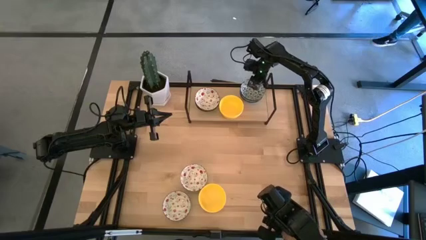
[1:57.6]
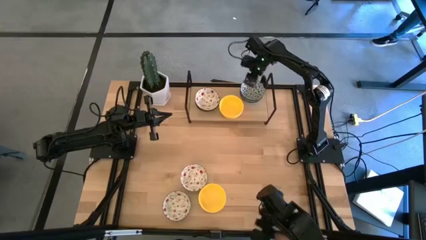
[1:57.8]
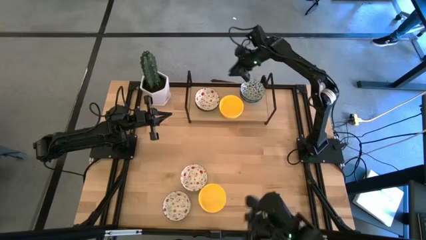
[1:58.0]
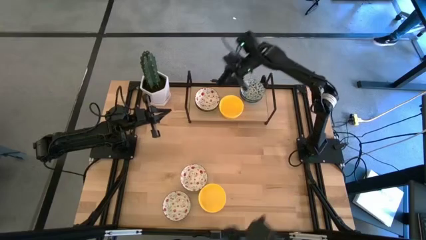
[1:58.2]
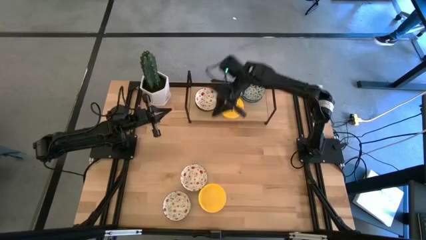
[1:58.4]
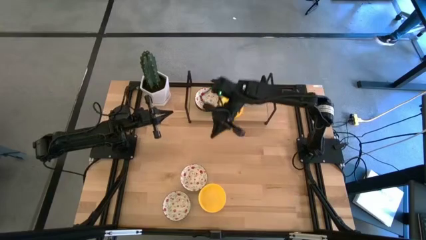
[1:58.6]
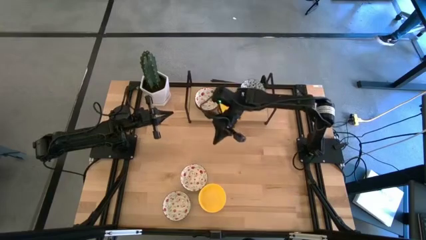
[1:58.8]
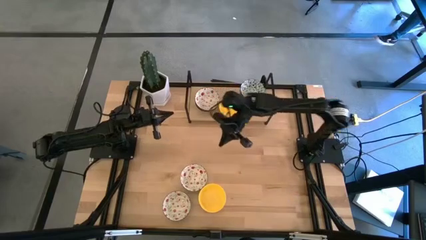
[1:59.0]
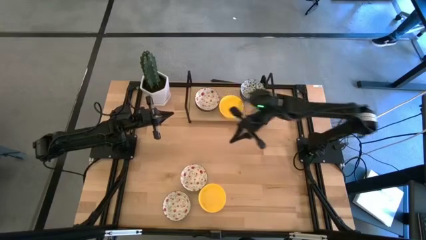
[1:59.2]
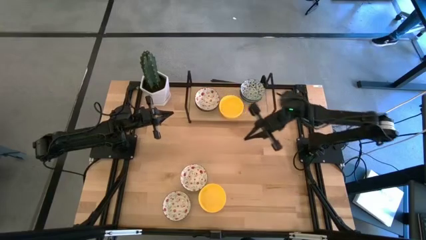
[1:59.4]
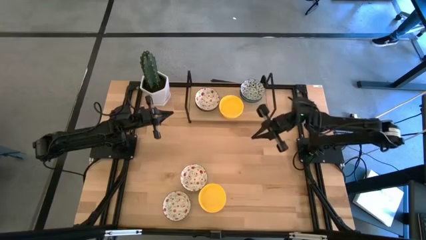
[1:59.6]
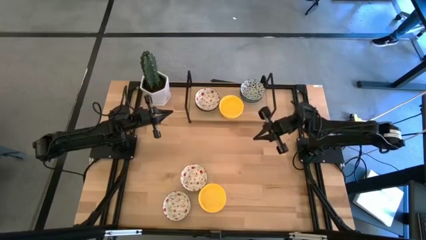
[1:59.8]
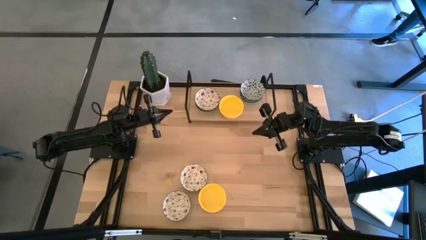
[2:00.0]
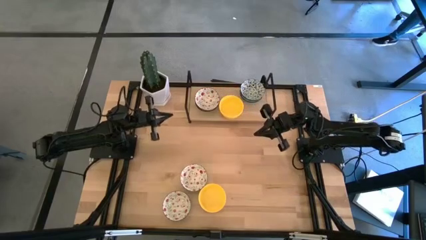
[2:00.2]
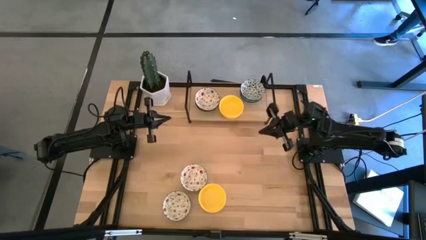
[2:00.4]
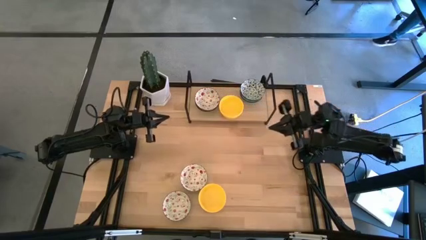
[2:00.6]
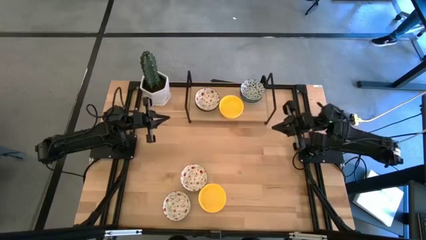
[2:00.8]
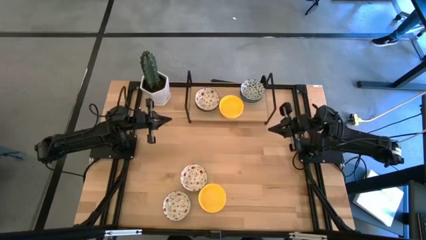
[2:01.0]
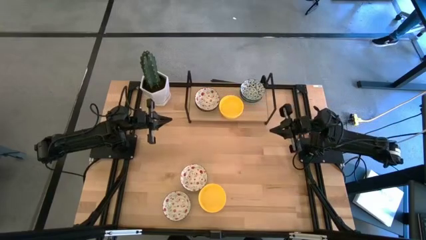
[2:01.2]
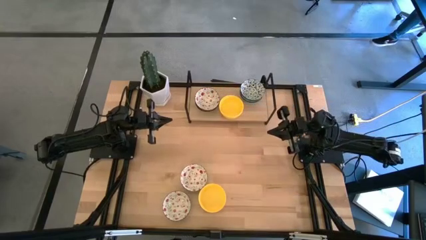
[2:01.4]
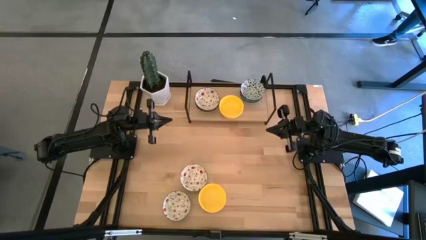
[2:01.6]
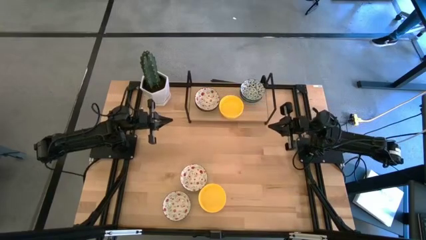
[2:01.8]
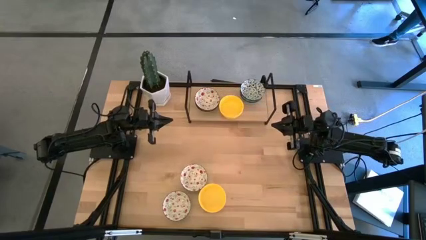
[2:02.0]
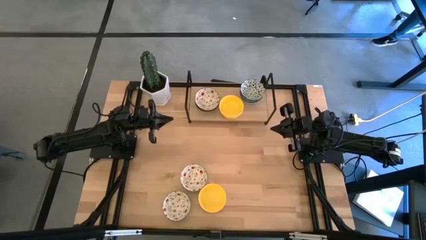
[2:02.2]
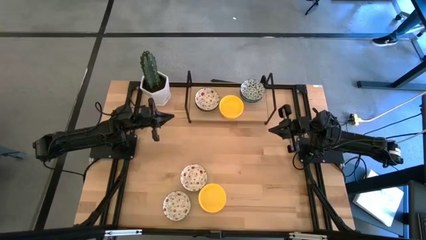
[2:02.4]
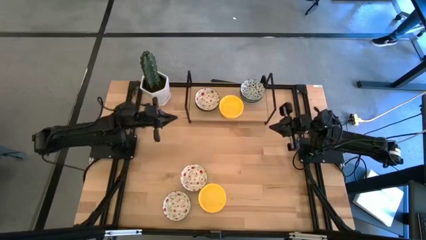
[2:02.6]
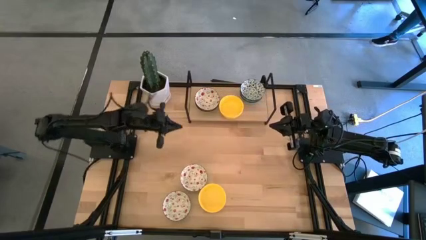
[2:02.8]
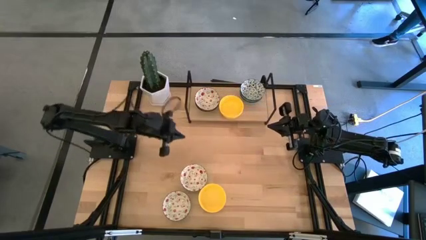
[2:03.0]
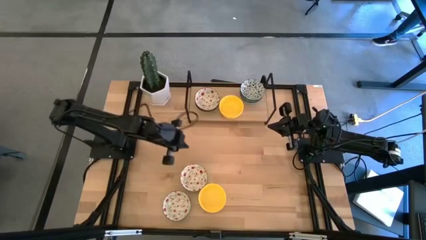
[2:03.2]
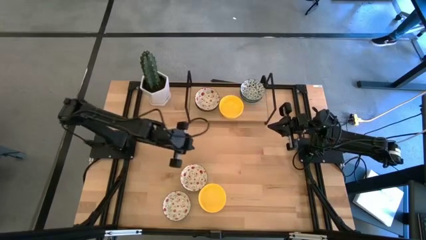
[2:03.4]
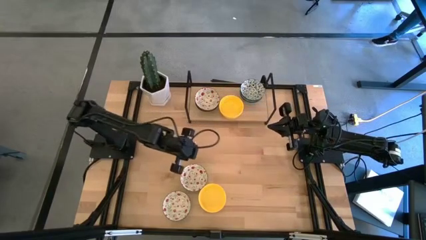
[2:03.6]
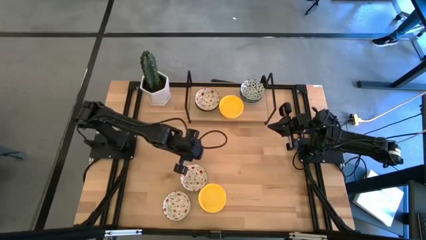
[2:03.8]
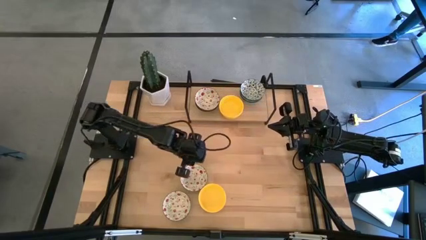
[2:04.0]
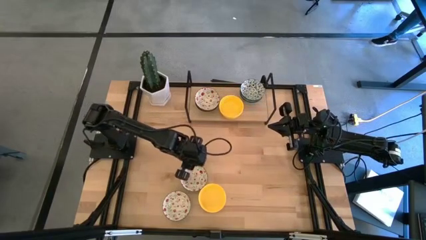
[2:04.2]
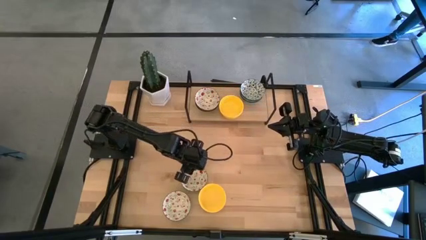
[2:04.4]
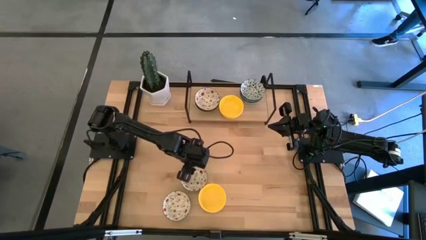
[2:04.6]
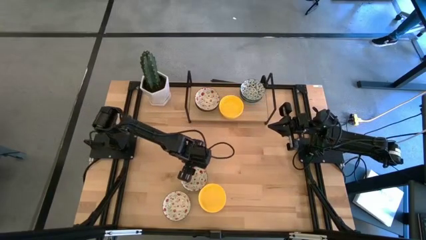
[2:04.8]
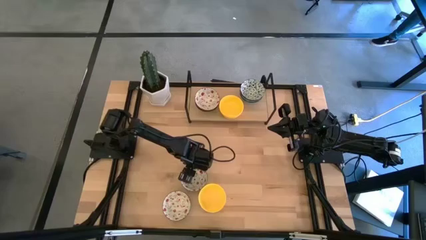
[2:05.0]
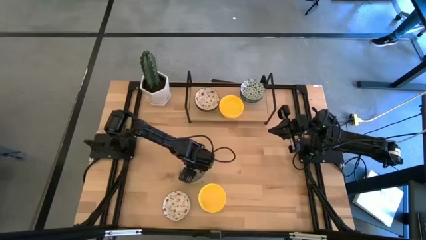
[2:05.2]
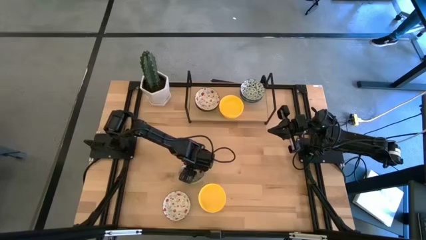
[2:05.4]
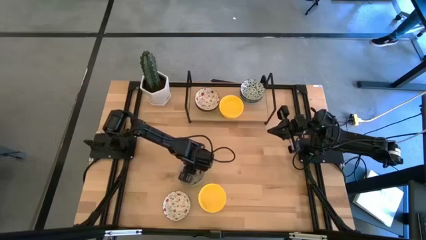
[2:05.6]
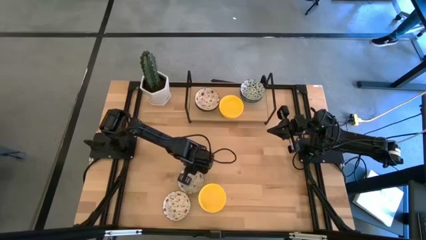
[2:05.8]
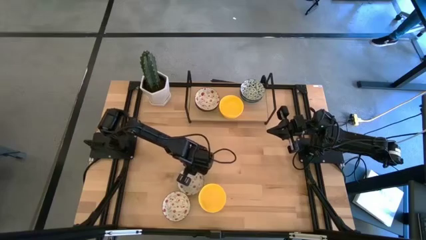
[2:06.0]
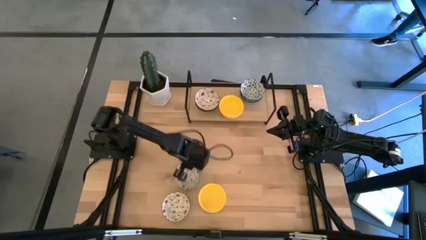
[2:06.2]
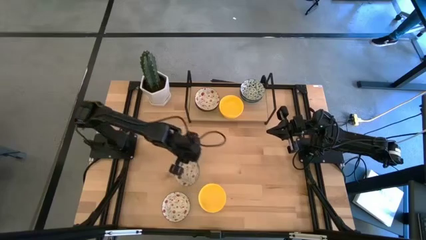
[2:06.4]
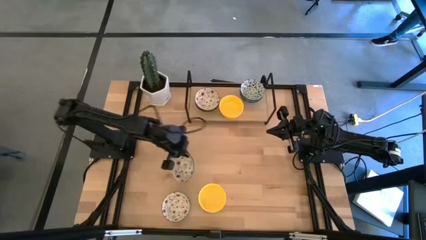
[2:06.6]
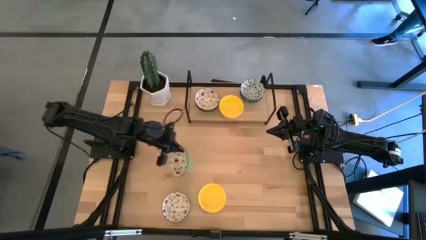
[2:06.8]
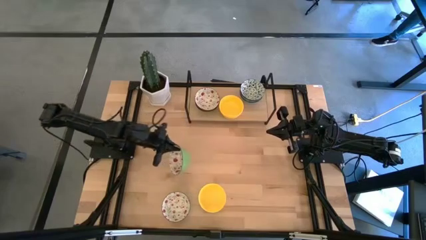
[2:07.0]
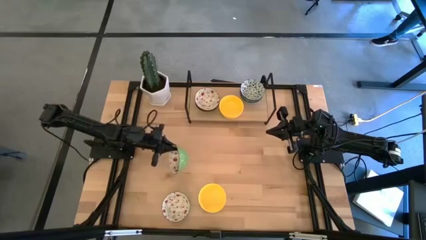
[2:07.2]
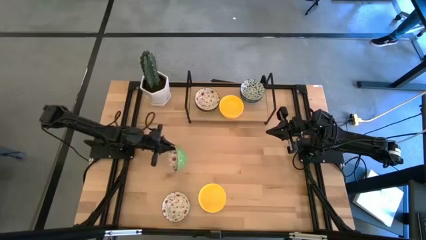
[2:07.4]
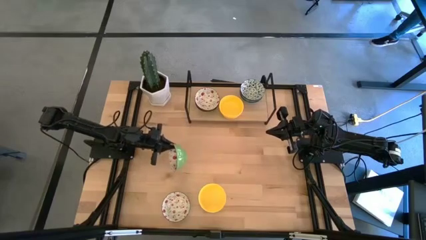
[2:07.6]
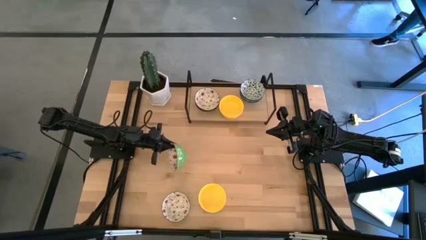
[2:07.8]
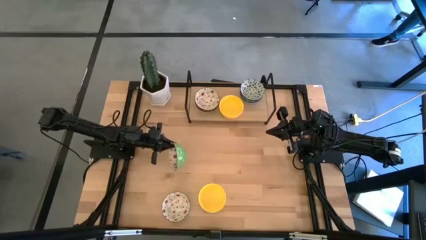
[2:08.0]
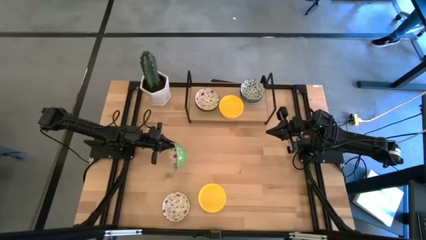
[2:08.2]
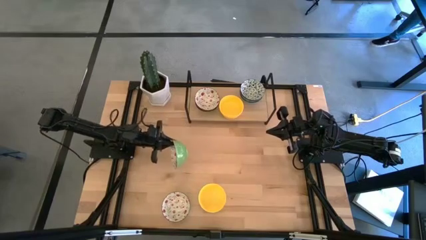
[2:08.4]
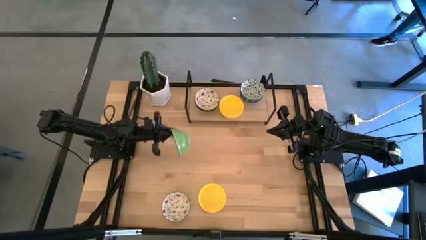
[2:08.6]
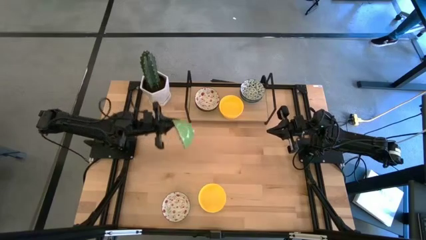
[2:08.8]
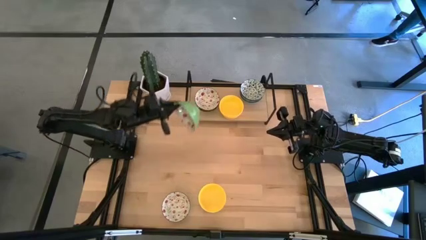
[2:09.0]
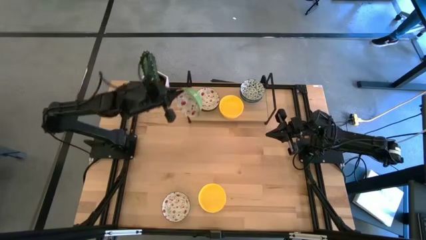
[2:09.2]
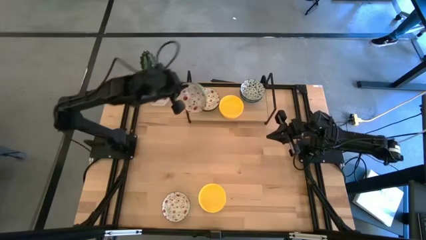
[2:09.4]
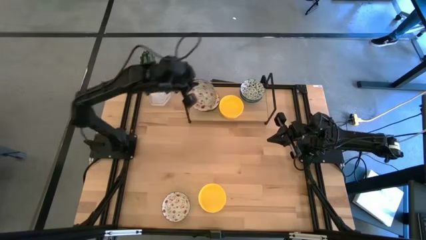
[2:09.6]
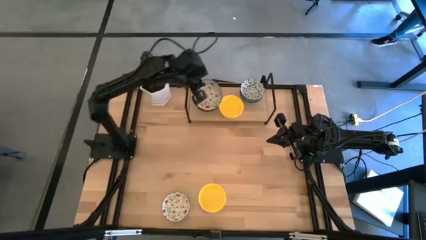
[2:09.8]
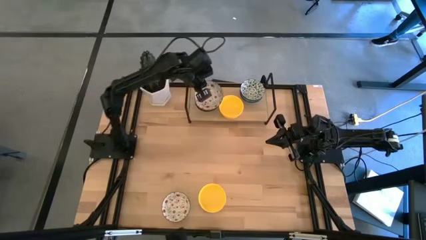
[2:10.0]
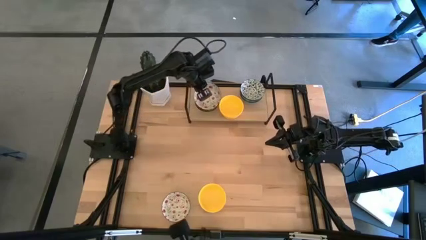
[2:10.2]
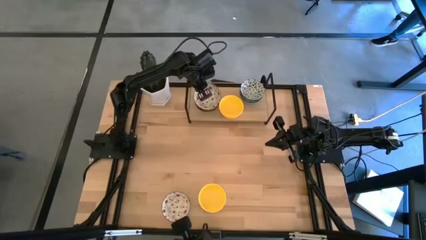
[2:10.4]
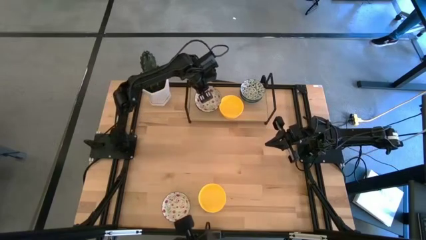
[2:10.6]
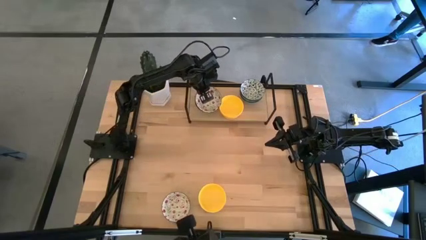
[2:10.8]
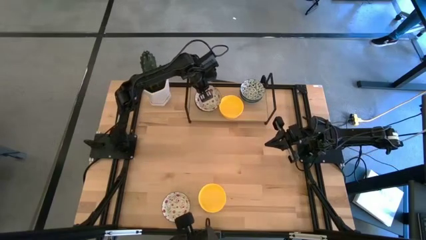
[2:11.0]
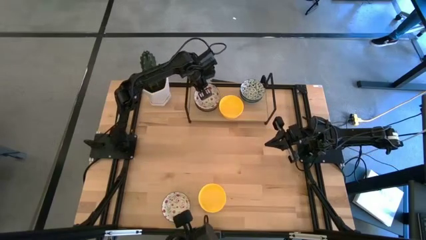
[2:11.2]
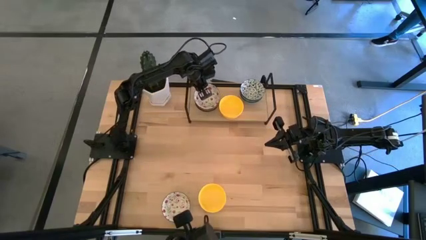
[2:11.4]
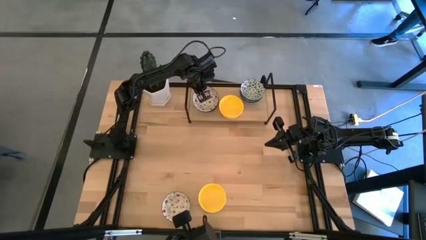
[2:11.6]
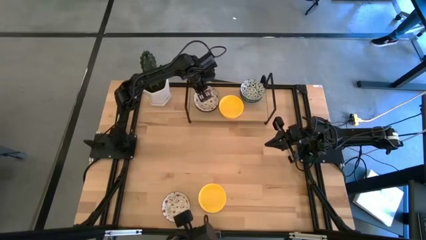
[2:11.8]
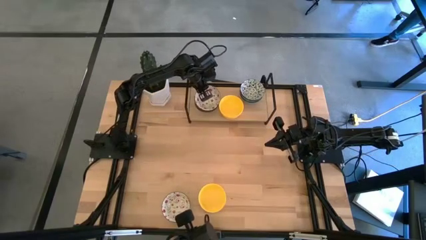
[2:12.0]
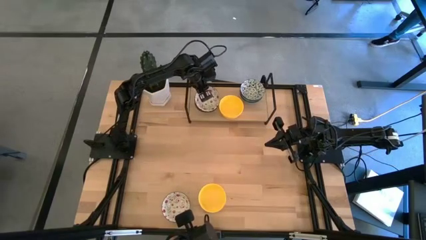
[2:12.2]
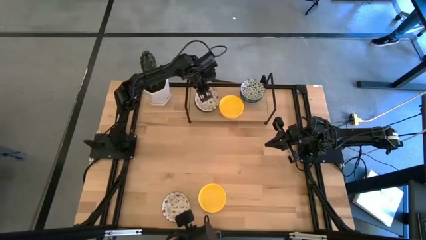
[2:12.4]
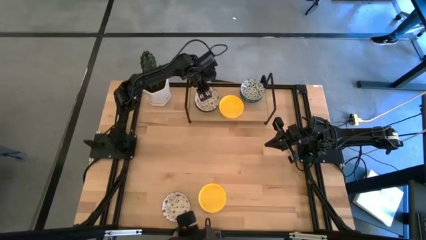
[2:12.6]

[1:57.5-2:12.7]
Task: Pick & Place Mini bowls
Stack the red green bowl on top of the red green bowl on the shelf
